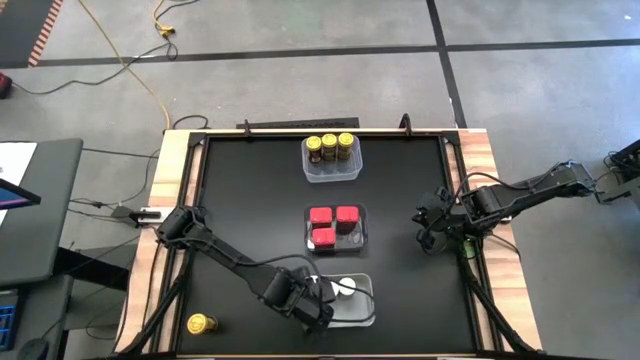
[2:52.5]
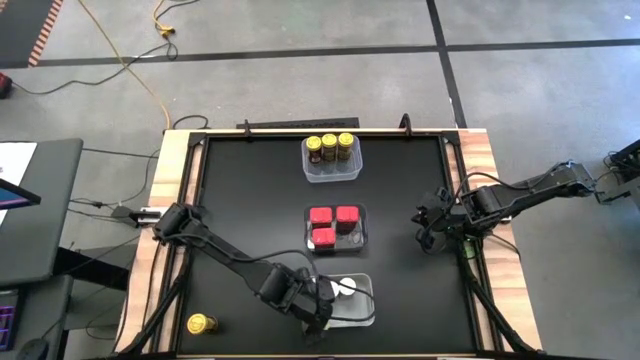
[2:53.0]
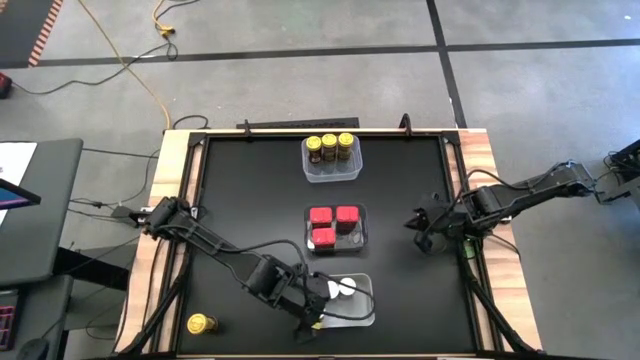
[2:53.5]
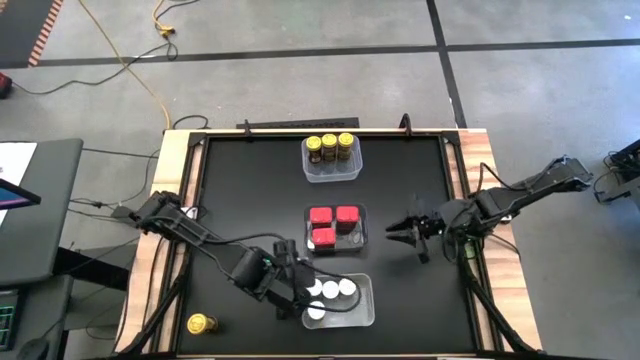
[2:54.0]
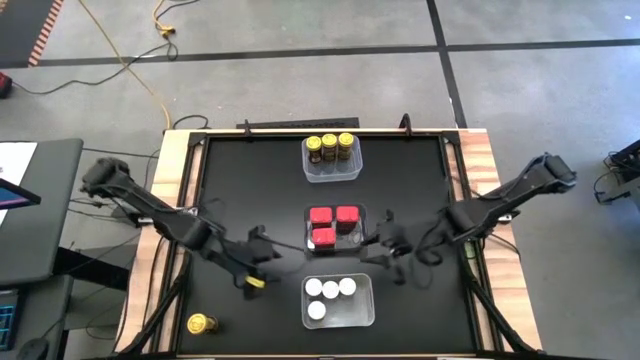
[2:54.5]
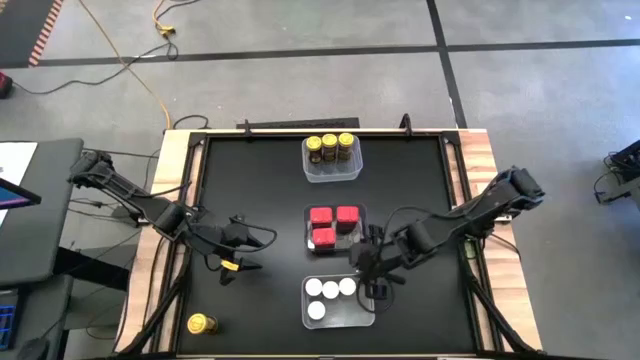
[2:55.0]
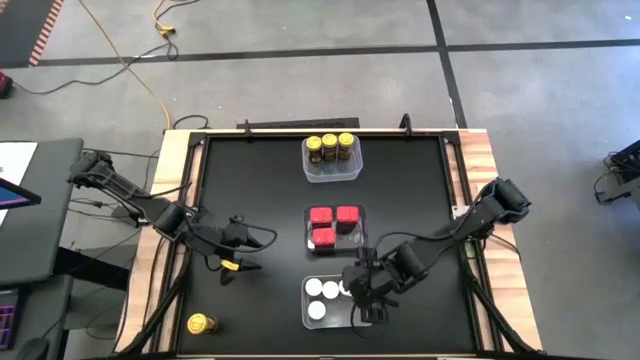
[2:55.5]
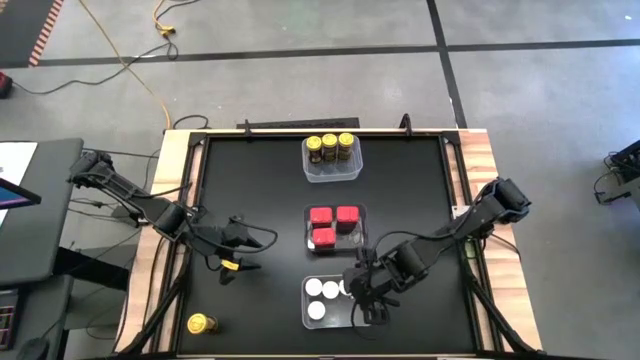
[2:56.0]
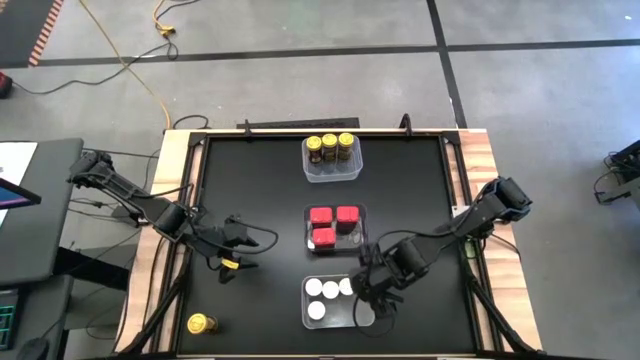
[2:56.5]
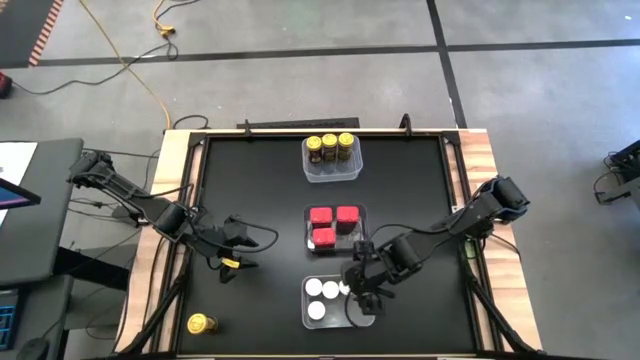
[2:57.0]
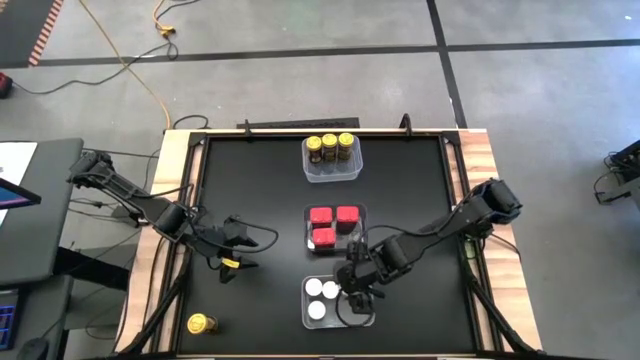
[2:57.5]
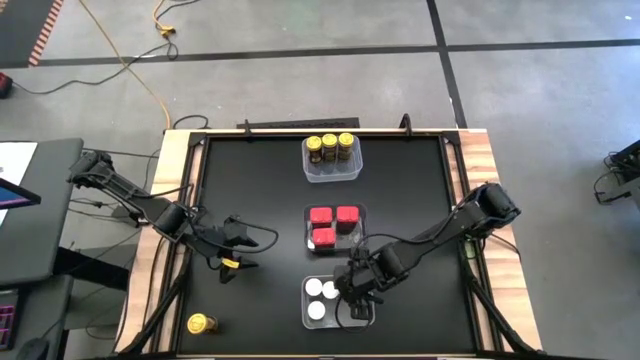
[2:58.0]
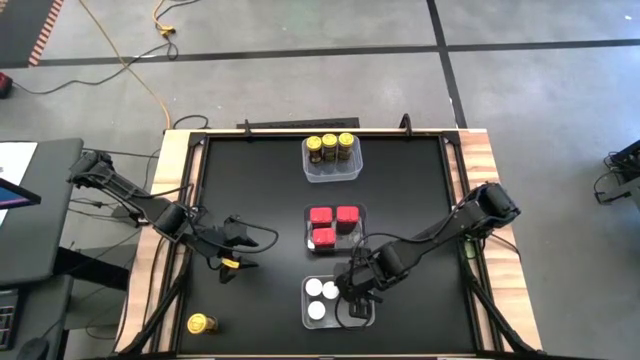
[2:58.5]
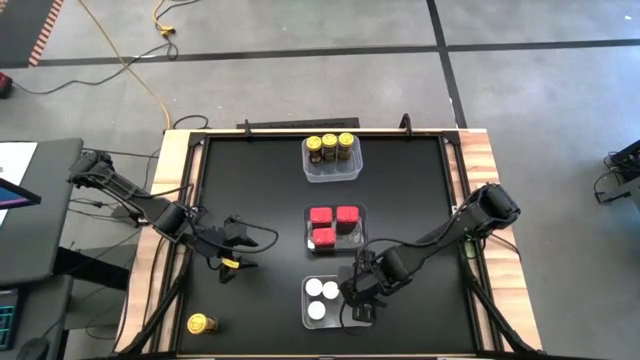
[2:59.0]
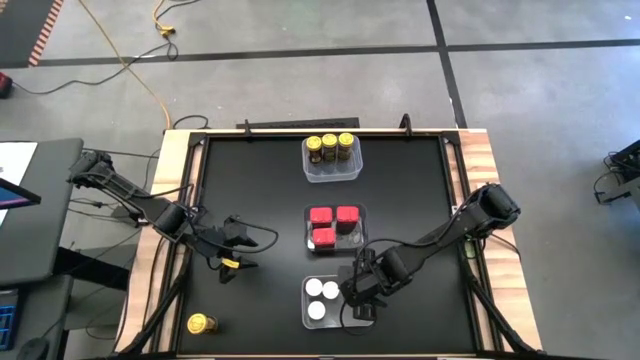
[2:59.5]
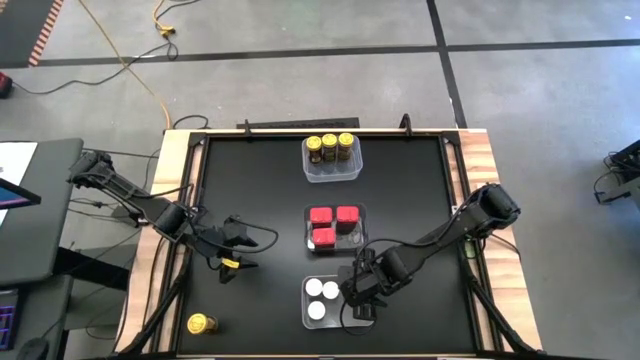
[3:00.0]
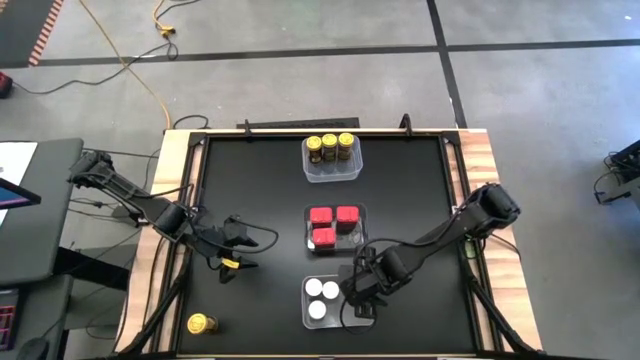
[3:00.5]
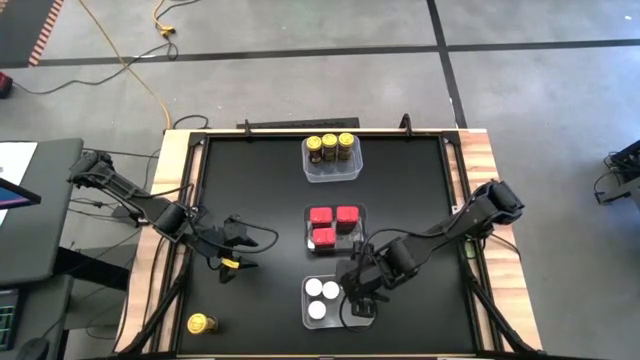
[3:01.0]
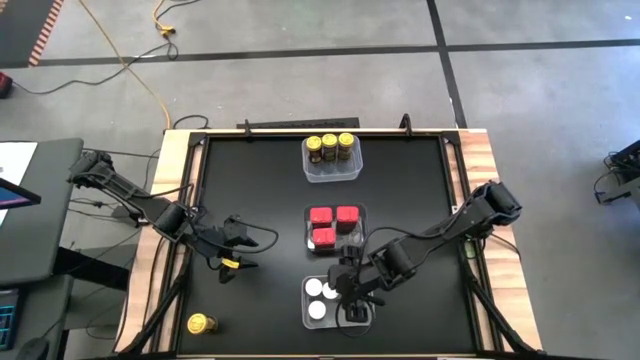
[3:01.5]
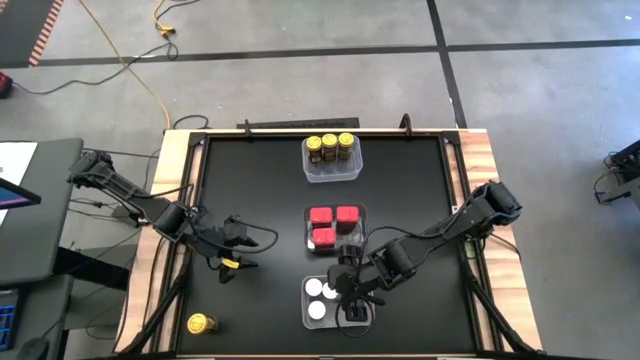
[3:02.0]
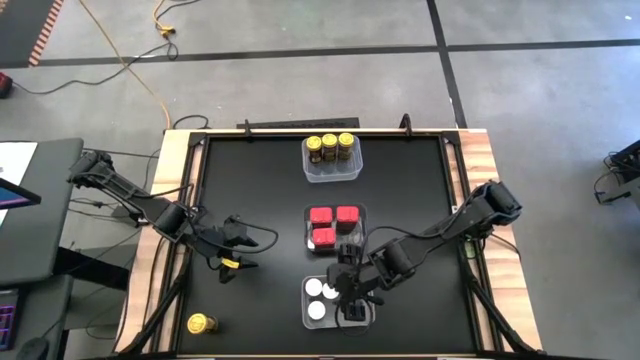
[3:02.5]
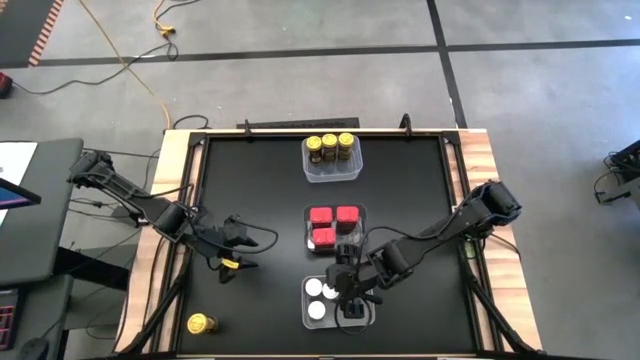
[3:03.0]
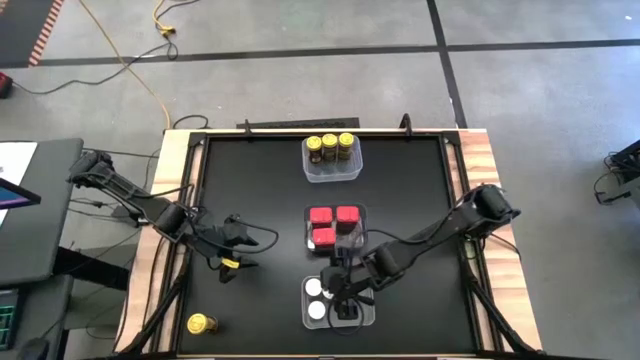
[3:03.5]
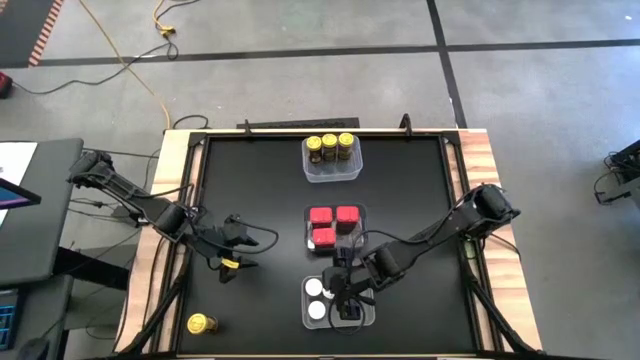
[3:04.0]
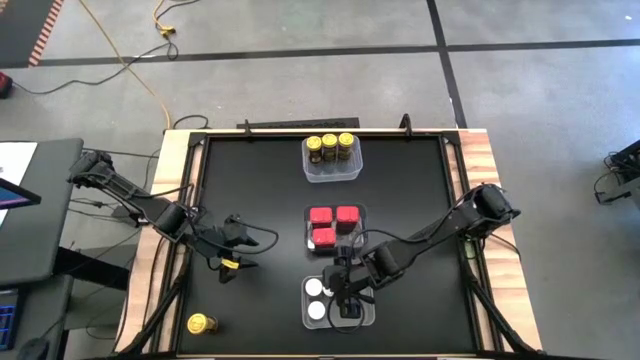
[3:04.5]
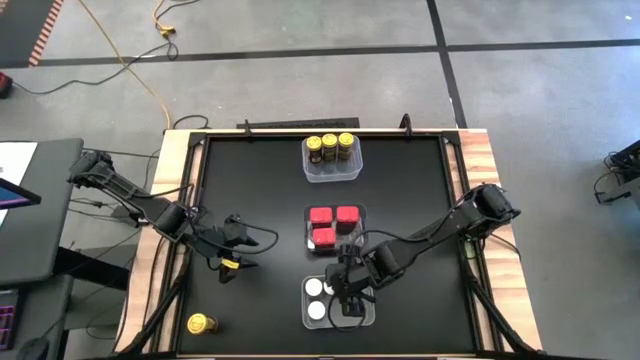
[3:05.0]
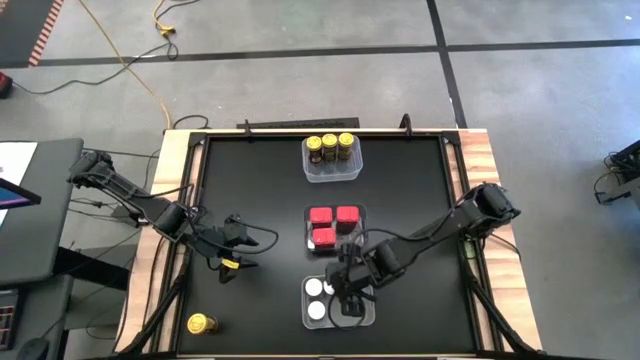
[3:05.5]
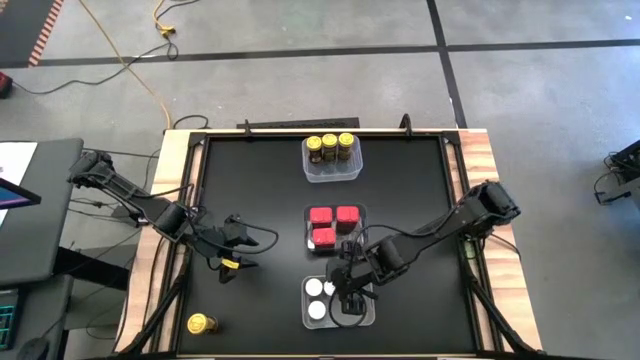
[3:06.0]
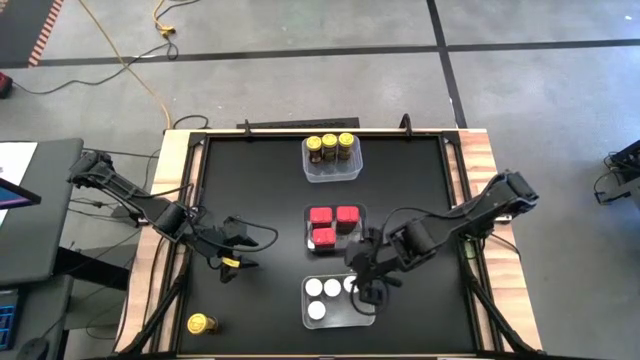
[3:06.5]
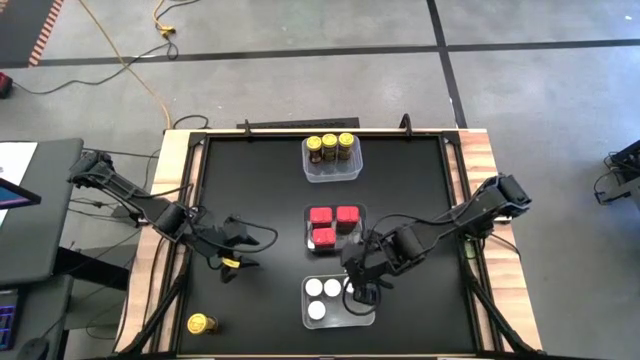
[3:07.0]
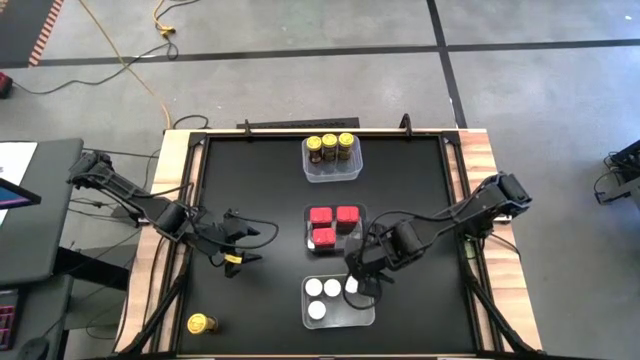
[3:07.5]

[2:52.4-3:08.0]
Task: Sort spices by type
Adjust the white seasoning bottles

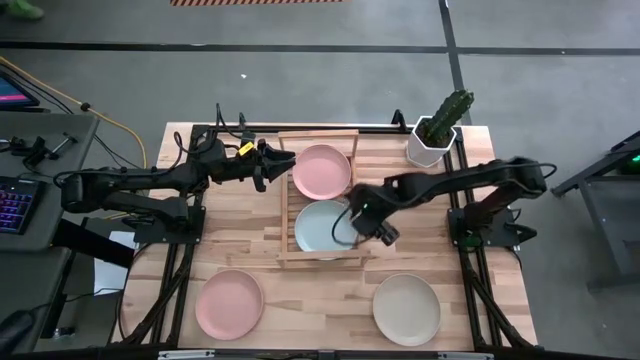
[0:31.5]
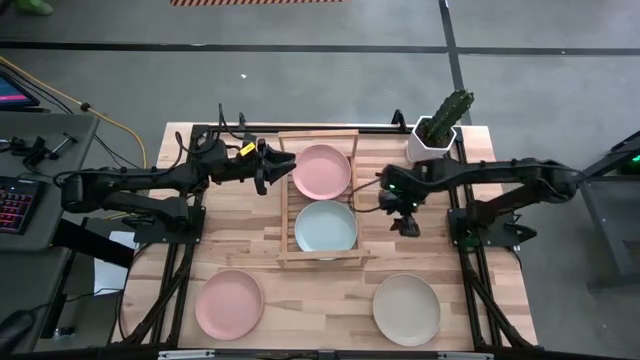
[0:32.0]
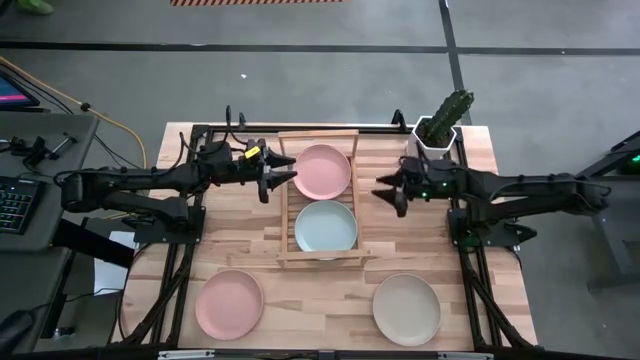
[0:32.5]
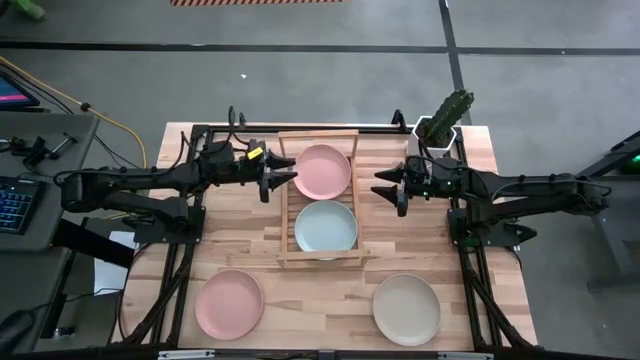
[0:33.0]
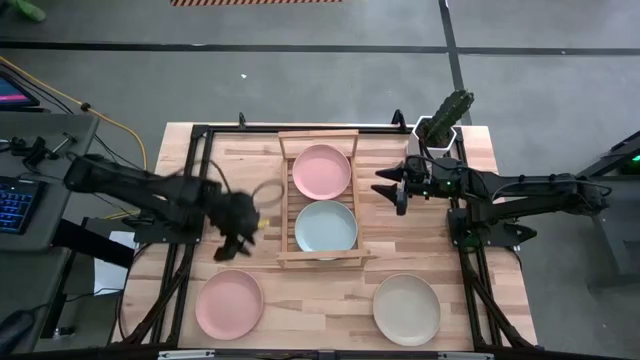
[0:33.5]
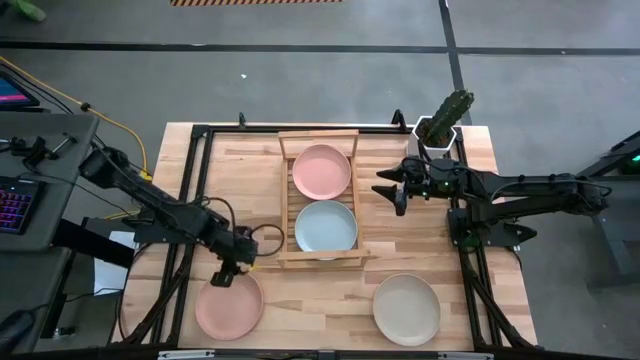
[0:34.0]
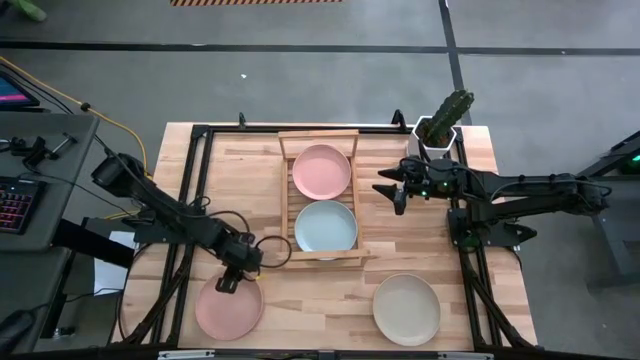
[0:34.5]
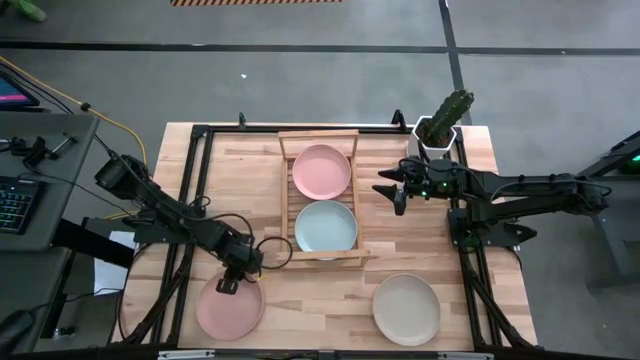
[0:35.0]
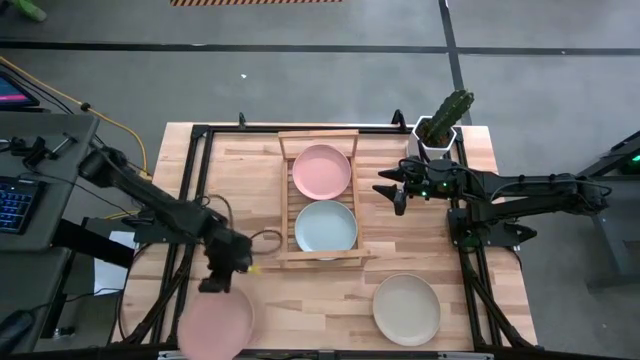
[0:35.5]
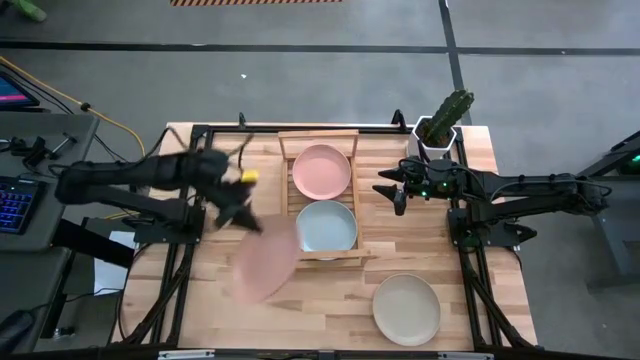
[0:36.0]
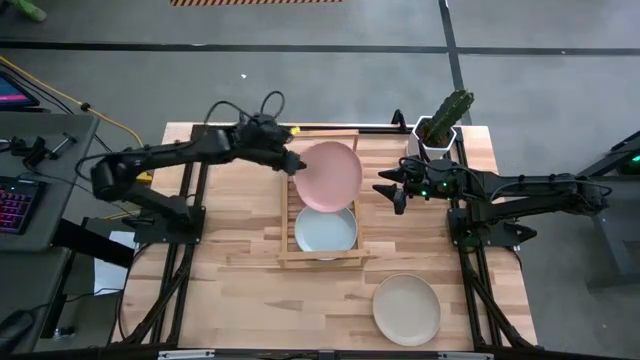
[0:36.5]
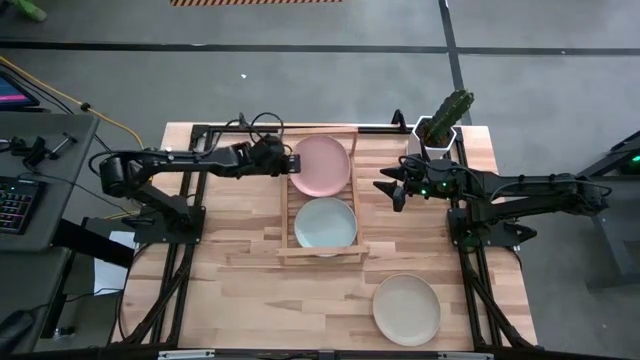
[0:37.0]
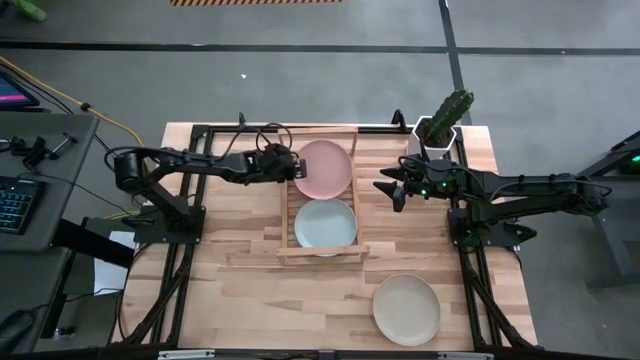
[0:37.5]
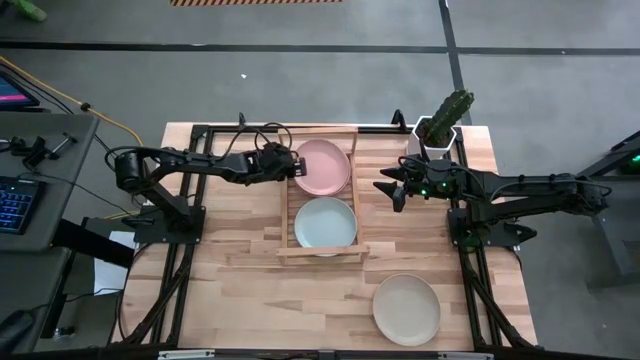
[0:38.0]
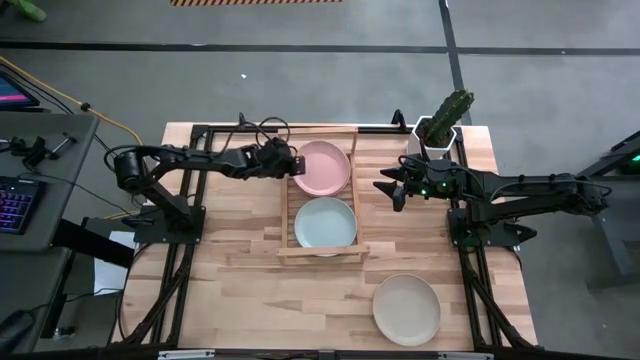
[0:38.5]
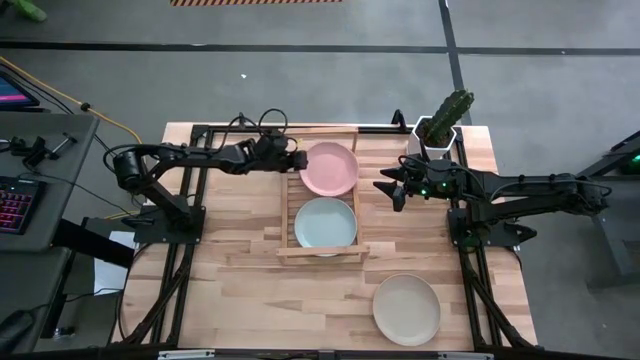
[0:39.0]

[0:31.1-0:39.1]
Task: Place and stack plates onto a shelf
Stack the light pink plate on top of the other light pink plate on the shelf
